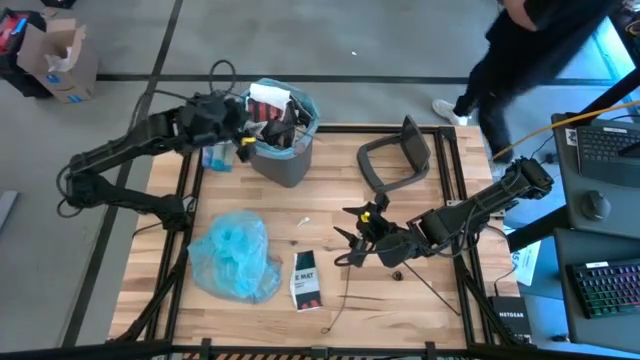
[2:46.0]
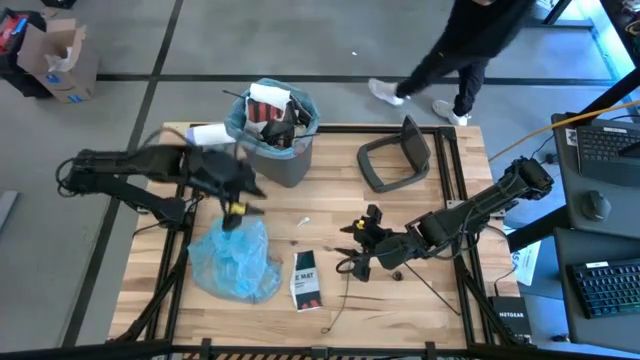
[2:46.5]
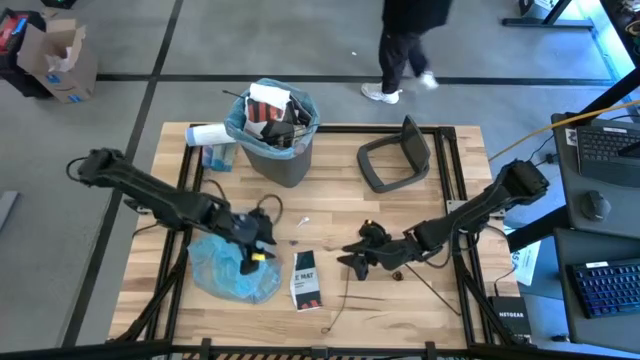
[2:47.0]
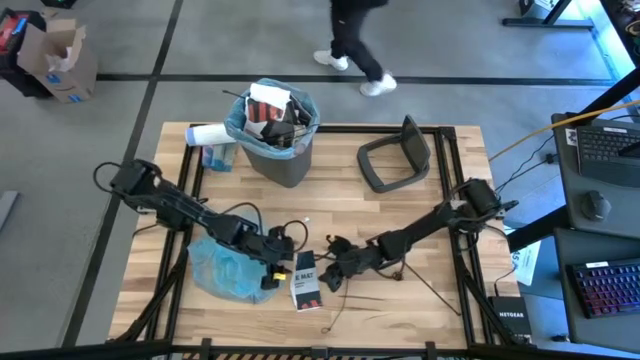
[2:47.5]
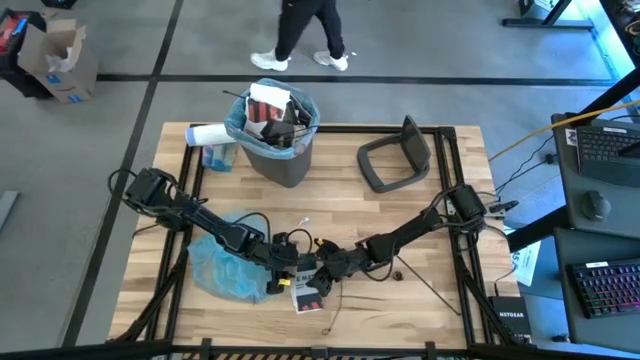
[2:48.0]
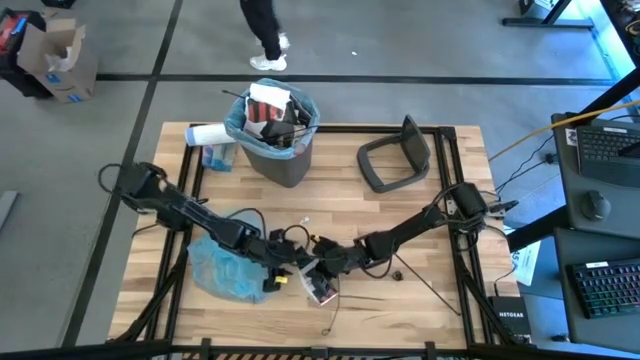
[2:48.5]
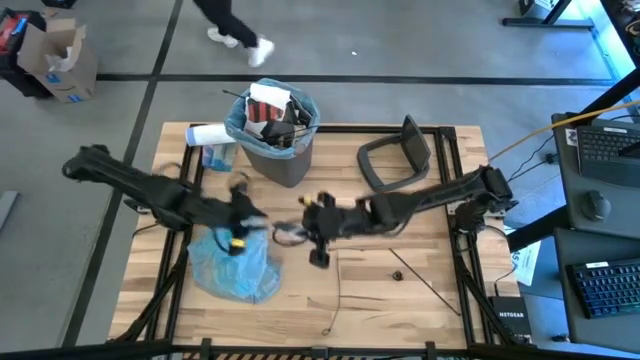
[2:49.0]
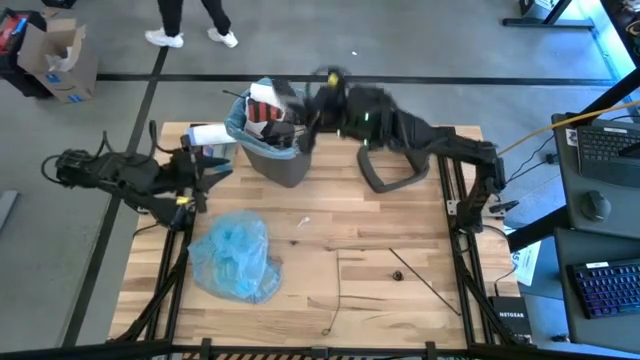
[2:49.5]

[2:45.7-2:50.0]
Task: Pick and place trash into bin
Put the white paper into the trash bin

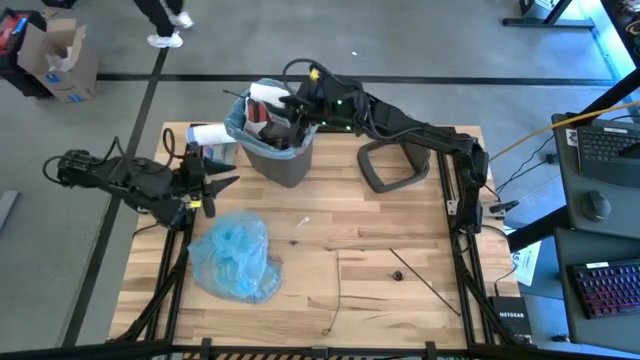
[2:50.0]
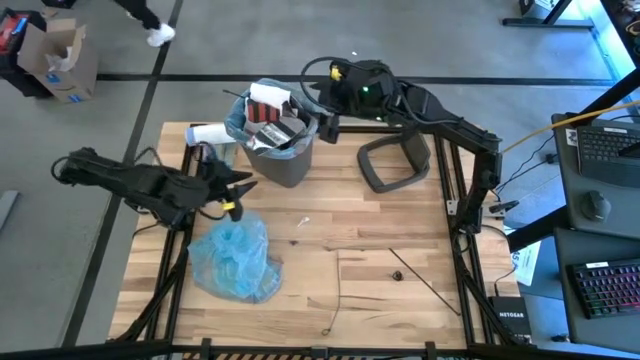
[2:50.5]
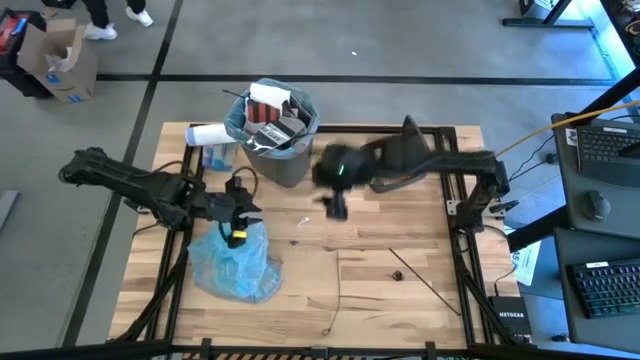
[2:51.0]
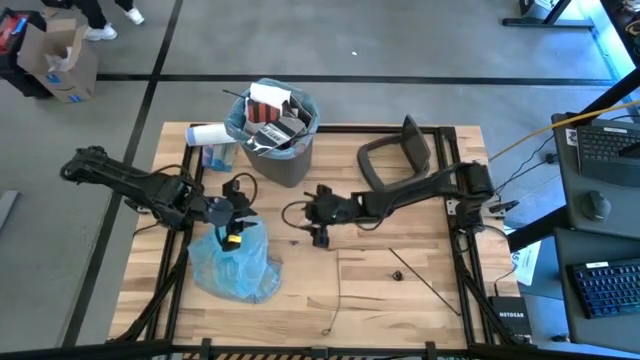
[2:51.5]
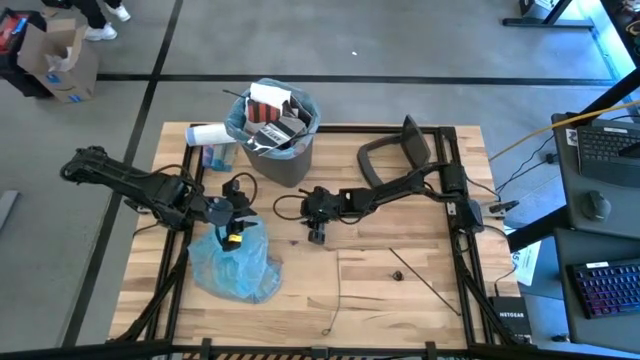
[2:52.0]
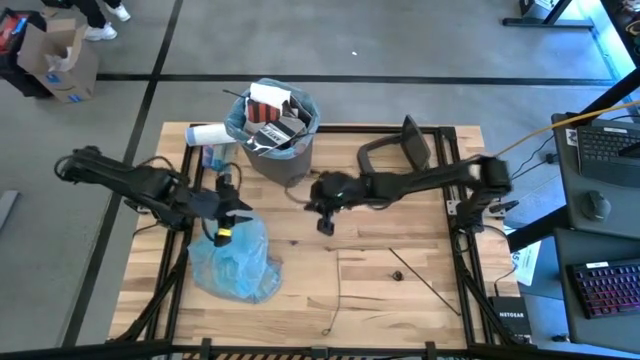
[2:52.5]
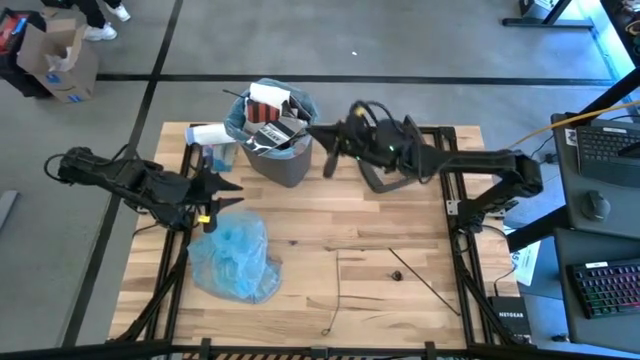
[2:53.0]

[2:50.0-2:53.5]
Put the blue paper into the trash bin

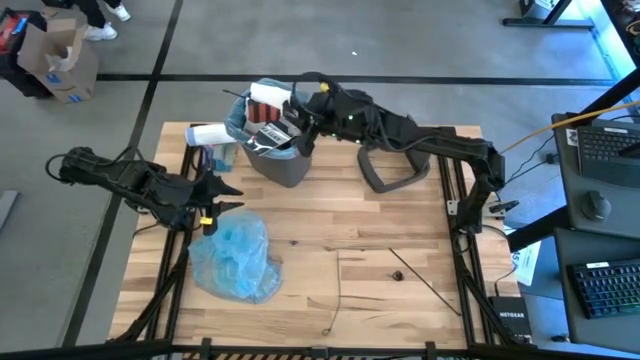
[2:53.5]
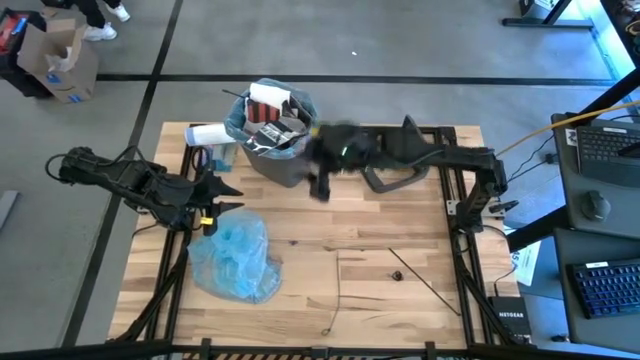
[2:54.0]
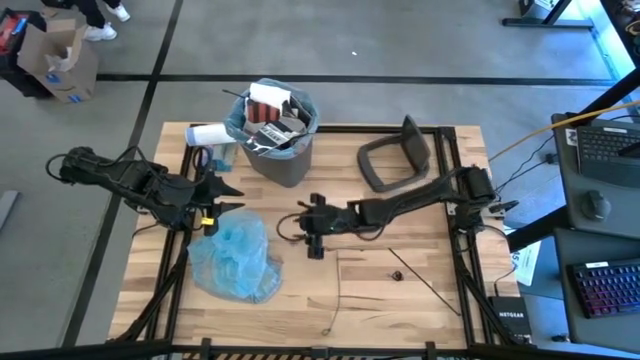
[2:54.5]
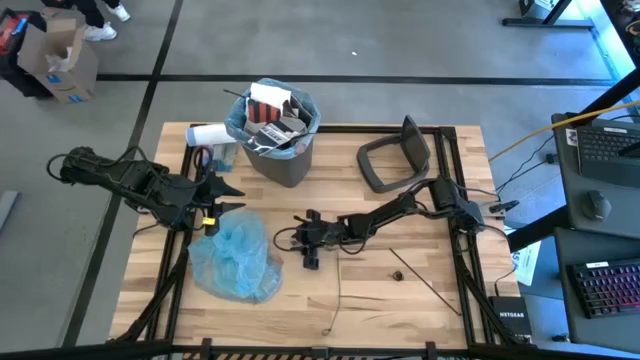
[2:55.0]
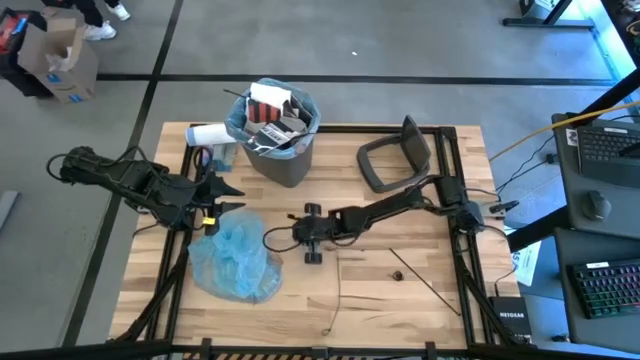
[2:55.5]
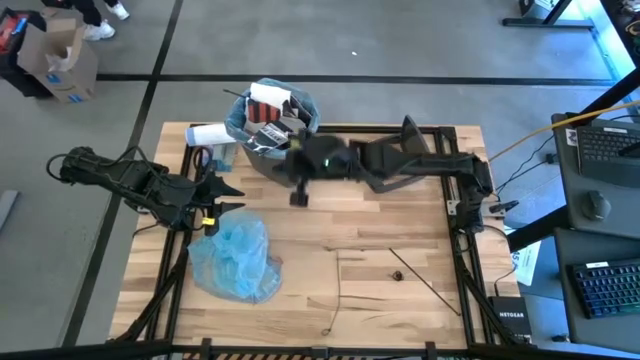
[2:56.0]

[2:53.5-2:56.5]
Put the violet candy wrapper into the trash bin

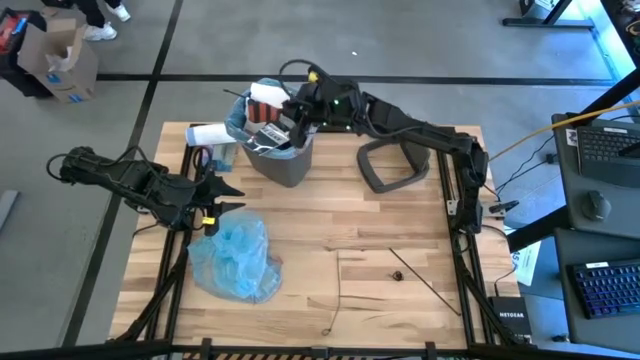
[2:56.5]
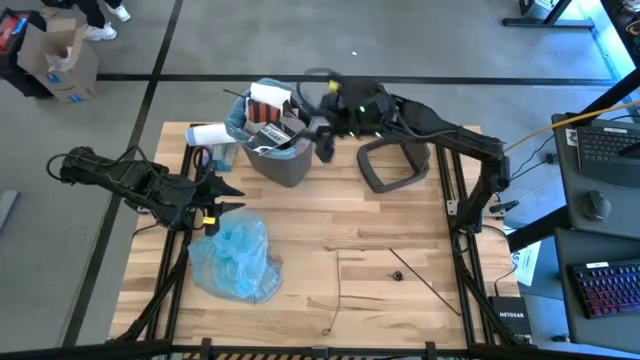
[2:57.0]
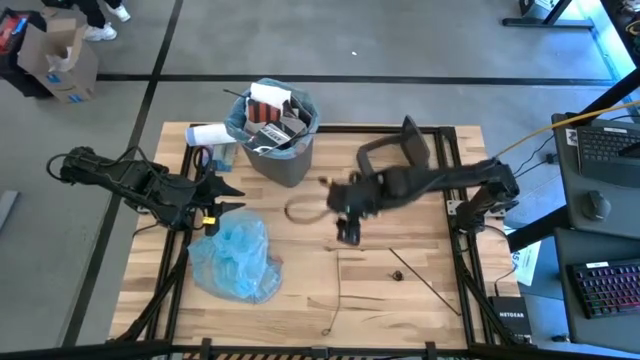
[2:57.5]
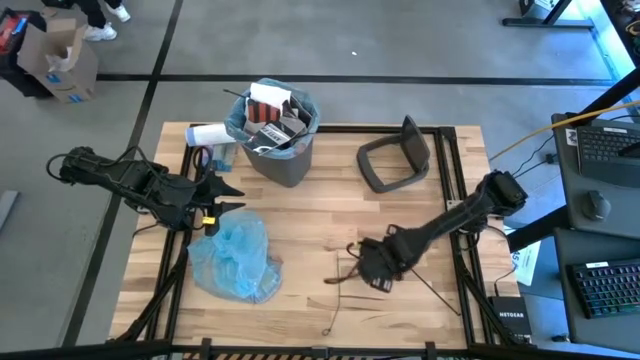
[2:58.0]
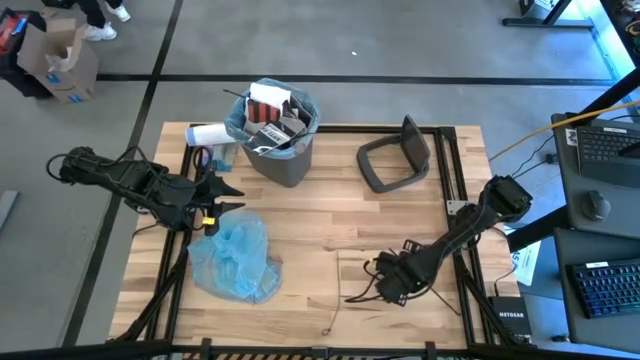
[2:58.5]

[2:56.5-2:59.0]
Put the center zip tie into the trash bin

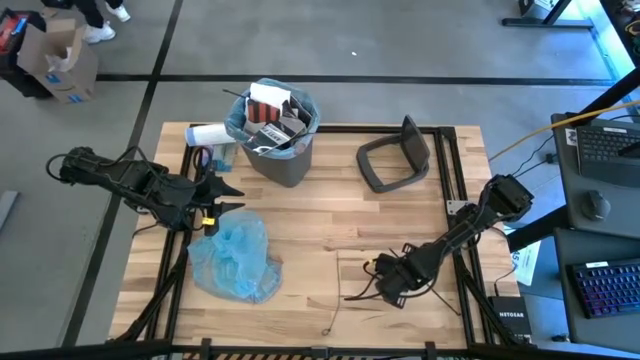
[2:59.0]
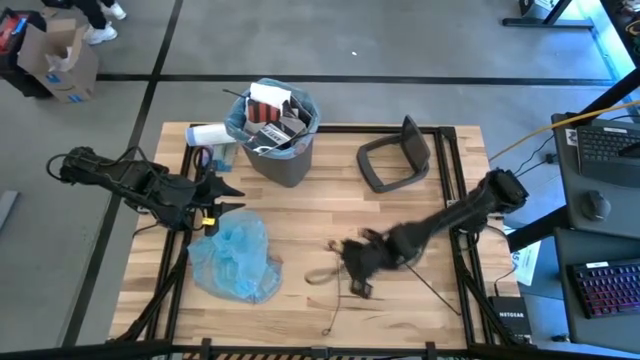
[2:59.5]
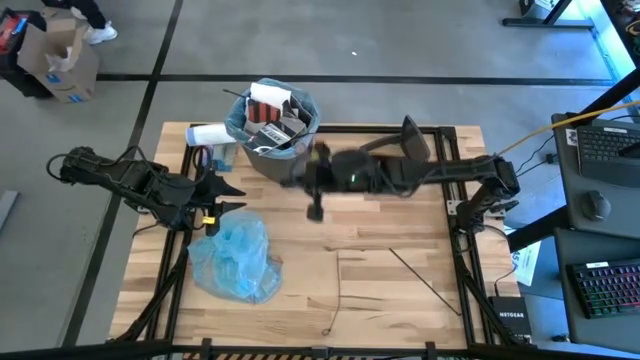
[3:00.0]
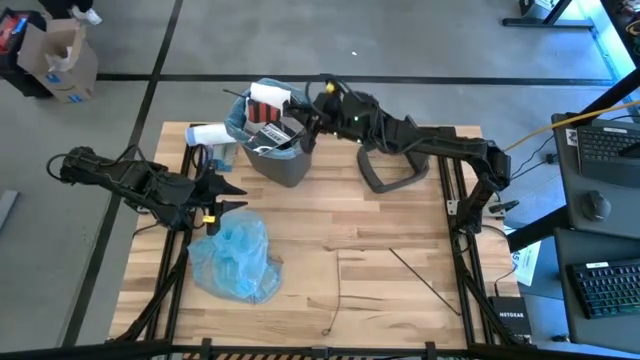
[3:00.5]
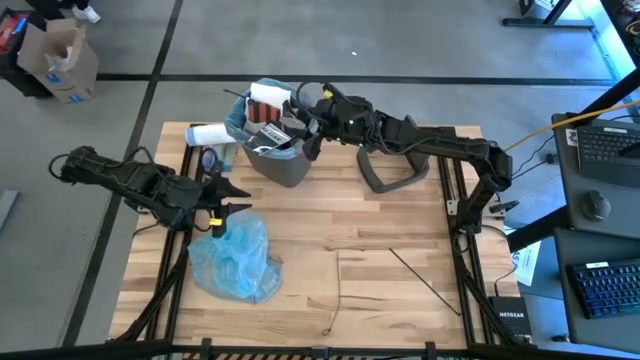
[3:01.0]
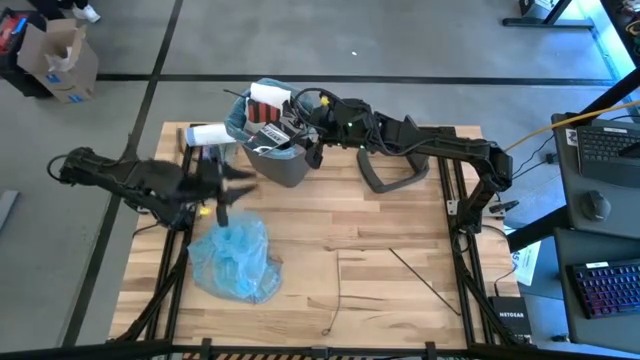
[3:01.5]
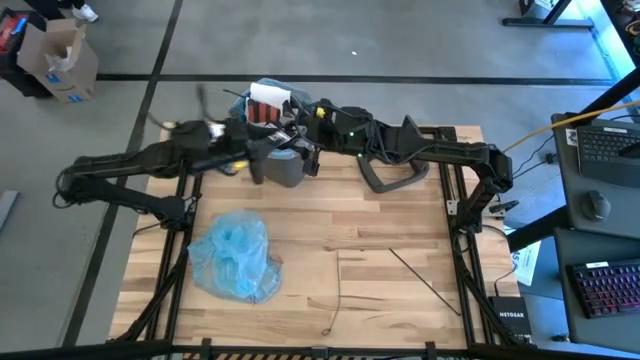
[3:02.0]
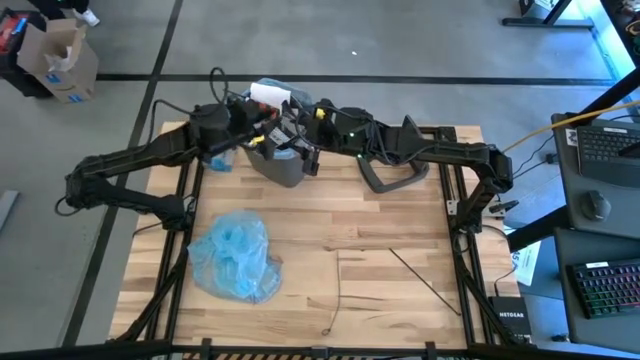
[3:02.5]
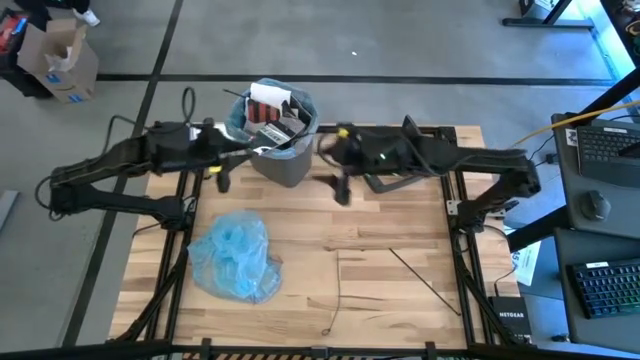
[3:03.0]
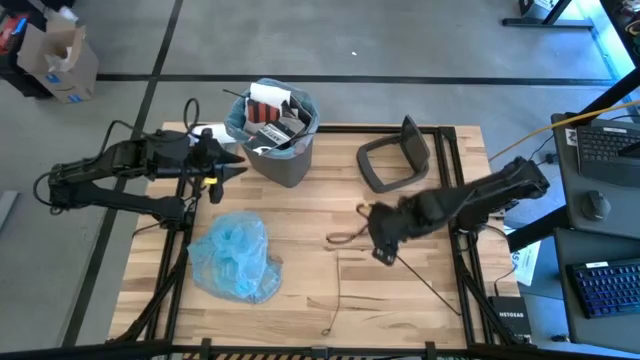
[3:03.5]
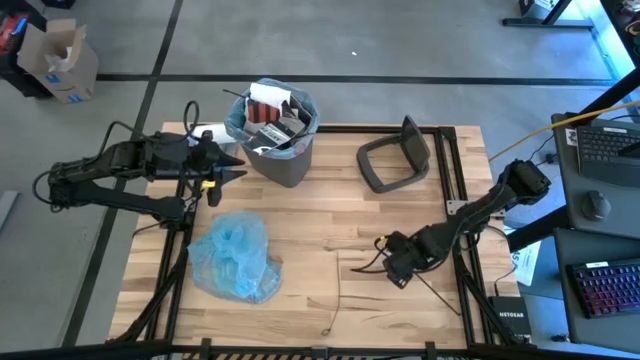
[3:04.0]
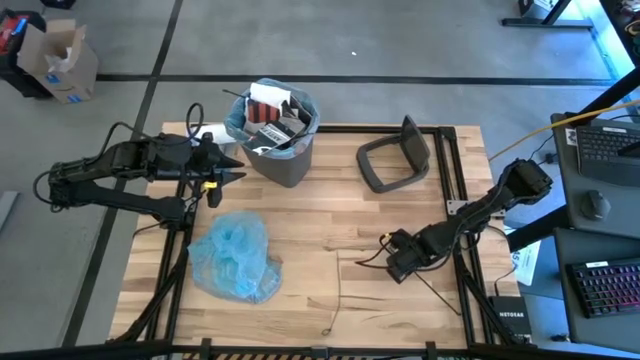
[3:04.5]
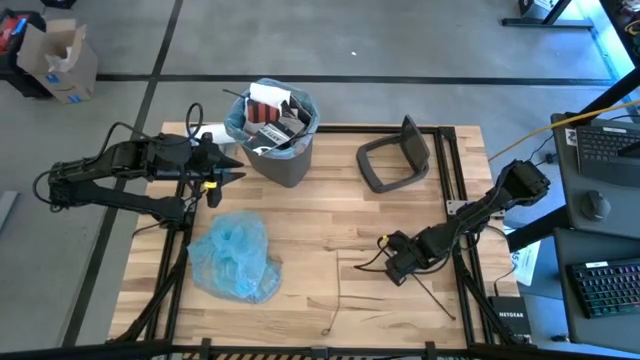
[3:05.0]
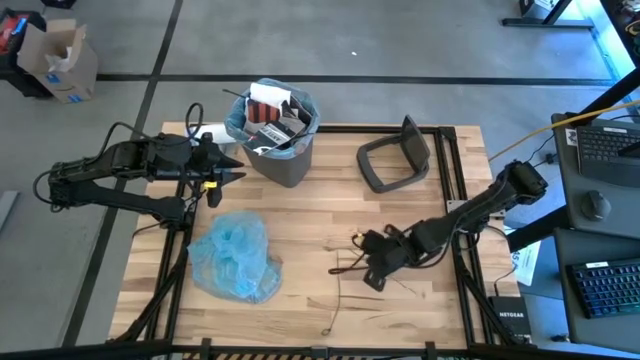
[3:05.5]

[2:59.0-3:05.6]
Put the right zip tie into the trash bin
